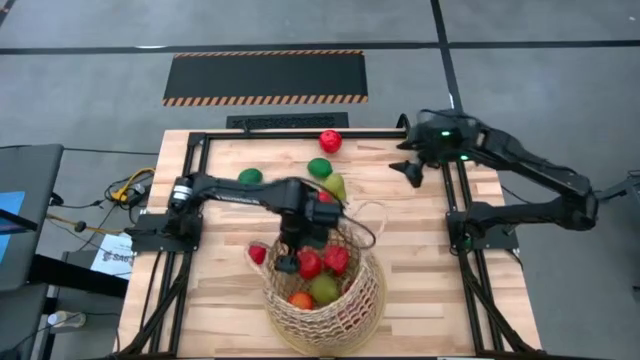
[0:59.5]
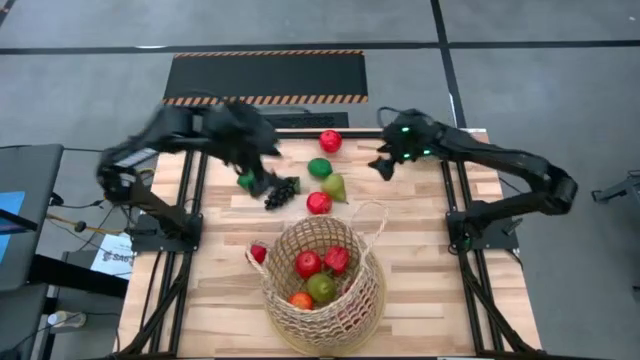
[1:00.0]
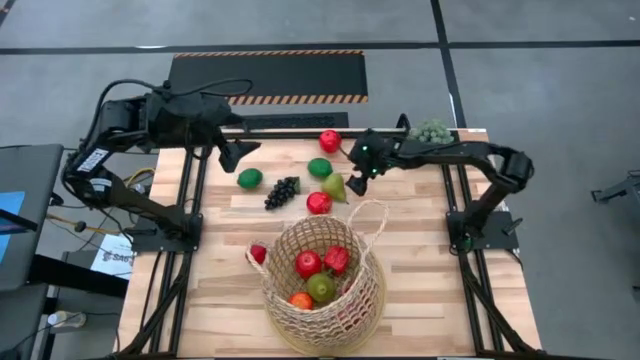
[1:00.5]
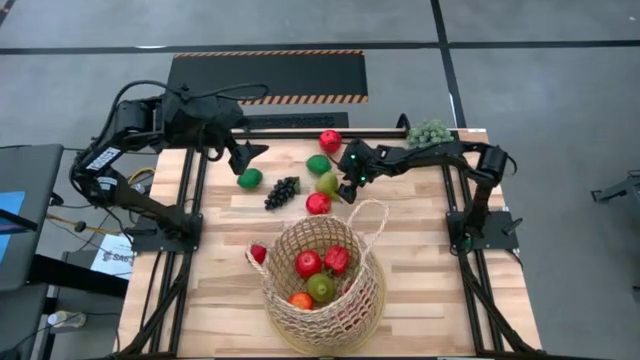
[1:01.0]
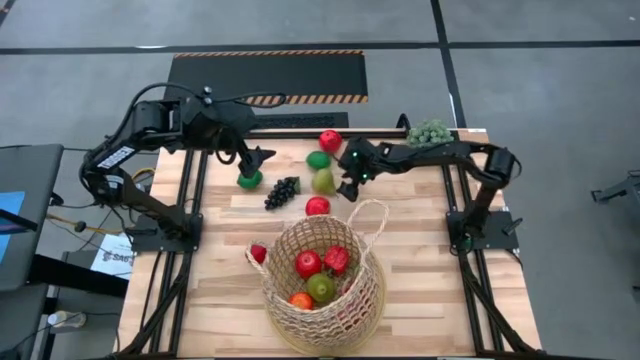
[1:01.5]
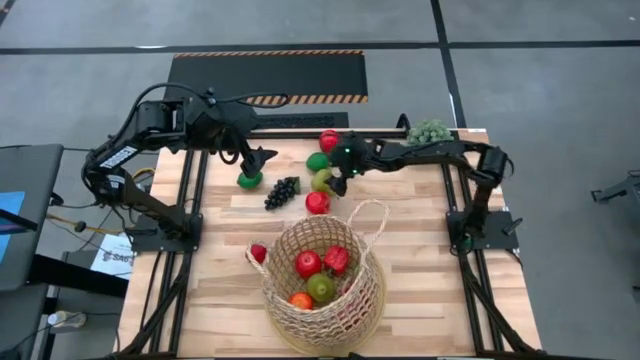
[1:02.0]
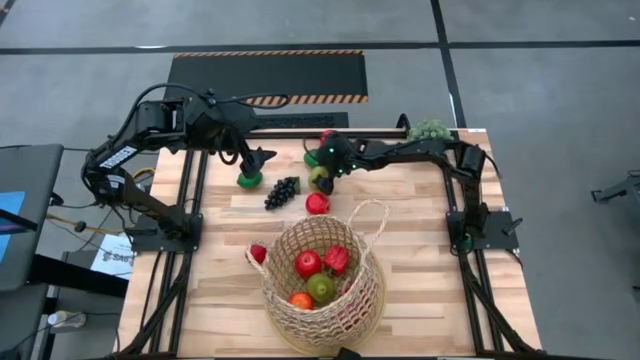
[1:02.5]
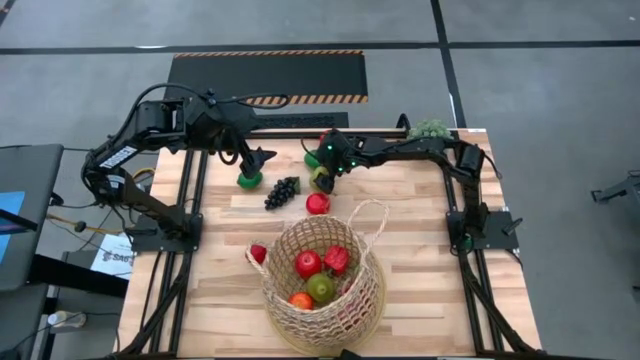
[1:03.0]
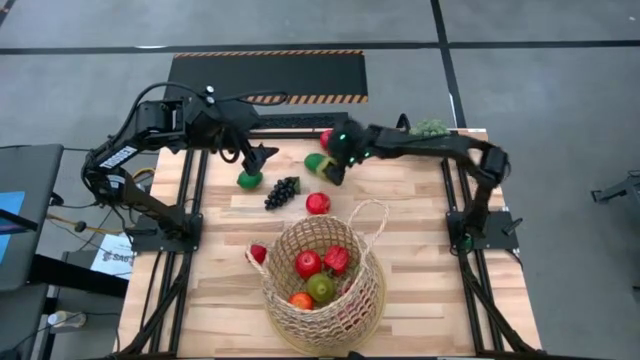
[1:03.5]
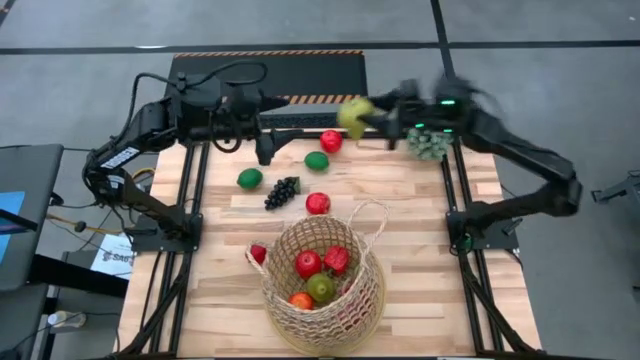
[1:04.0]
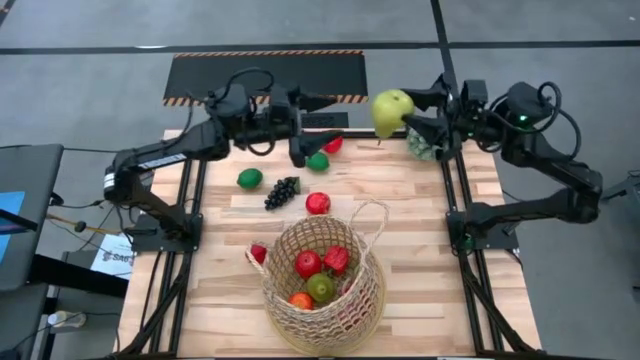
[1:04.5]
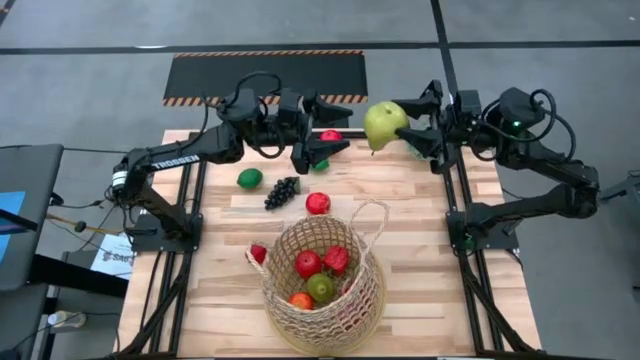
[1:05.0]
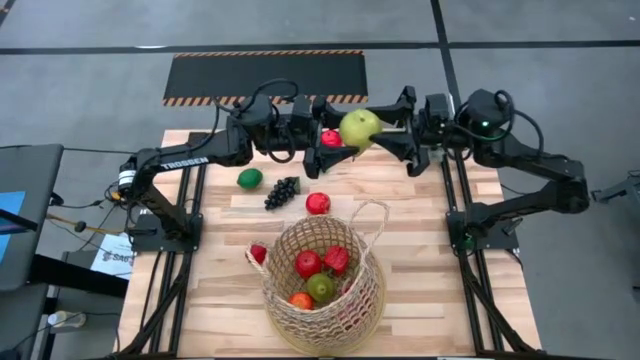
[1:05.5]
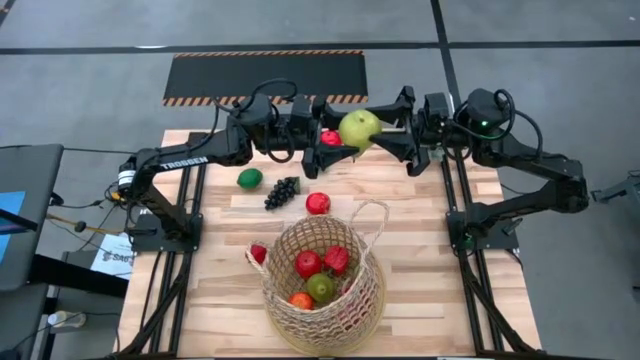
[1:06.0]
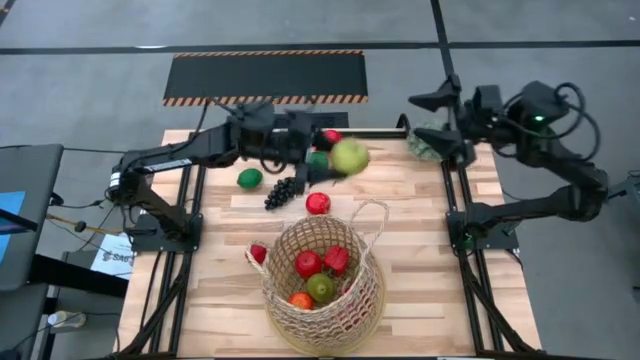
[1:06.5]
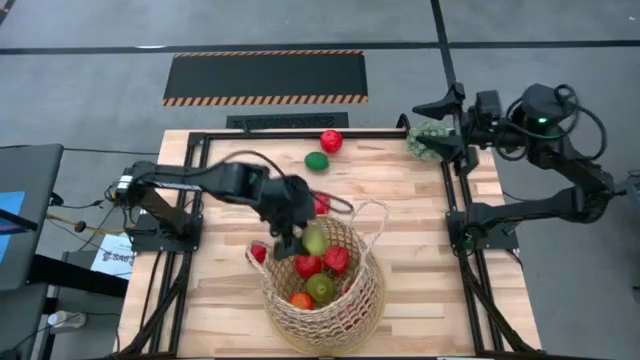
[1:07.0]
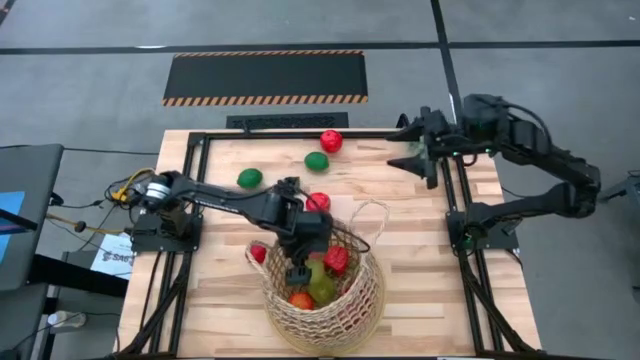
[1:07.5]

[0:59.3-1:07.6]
Task: Build produce basket
Put the pear into the basket

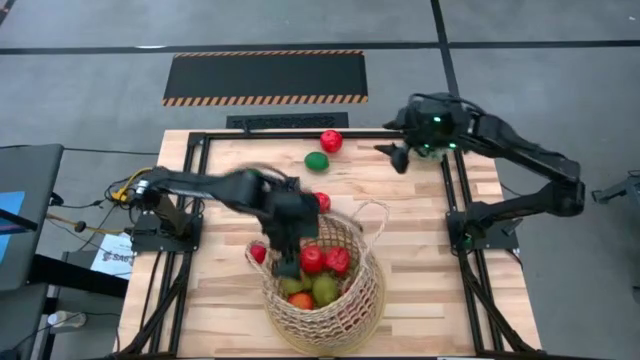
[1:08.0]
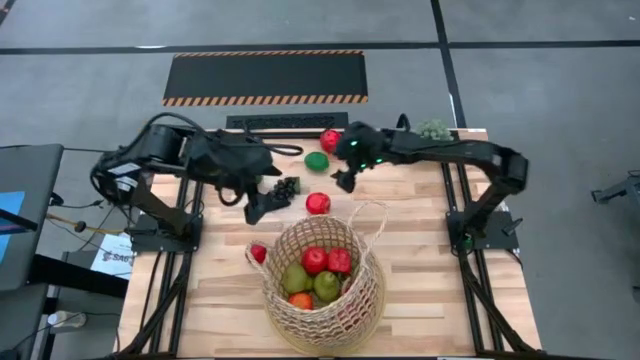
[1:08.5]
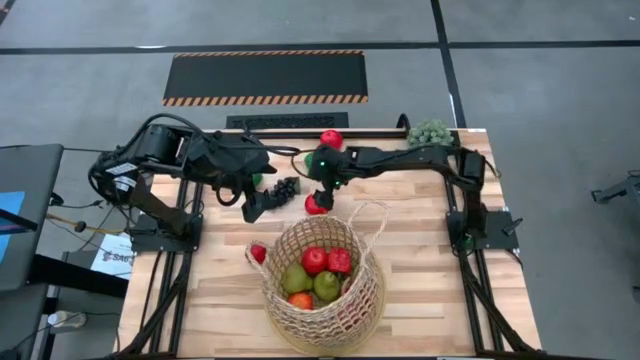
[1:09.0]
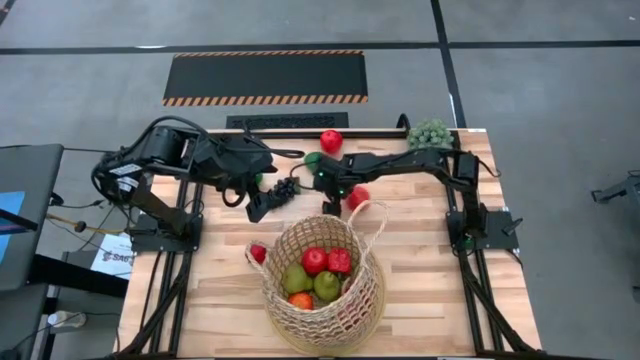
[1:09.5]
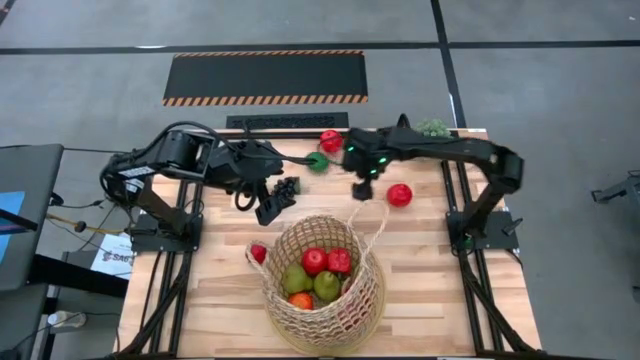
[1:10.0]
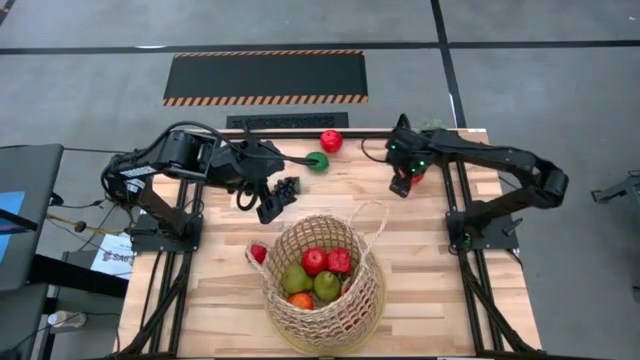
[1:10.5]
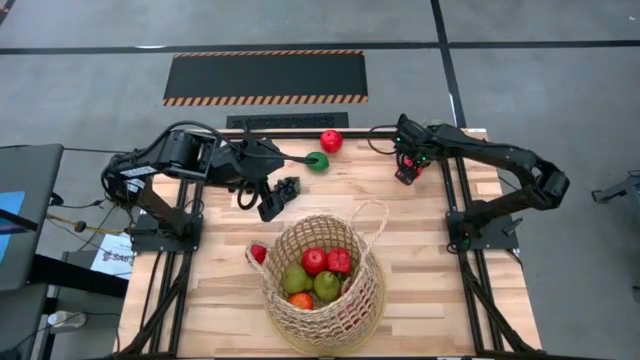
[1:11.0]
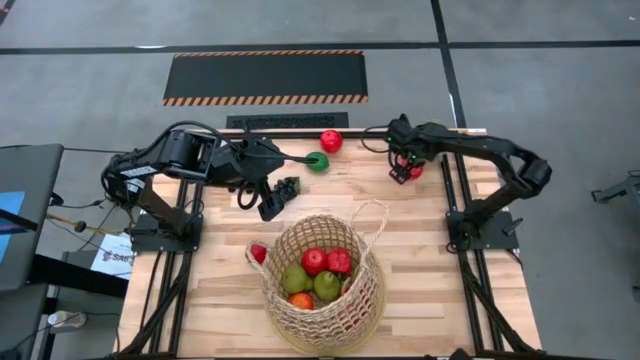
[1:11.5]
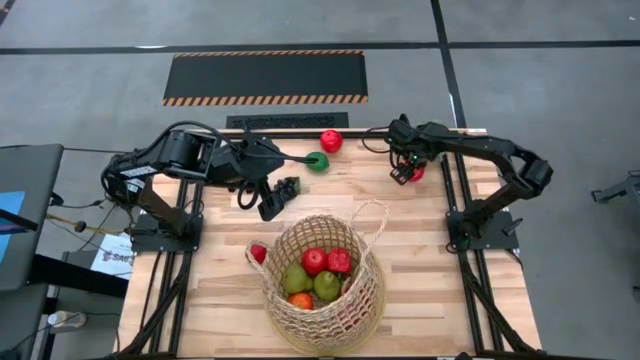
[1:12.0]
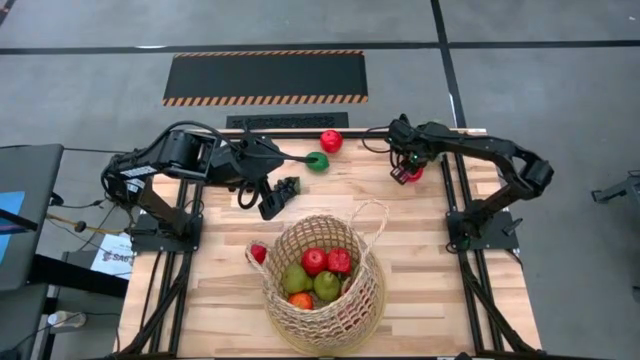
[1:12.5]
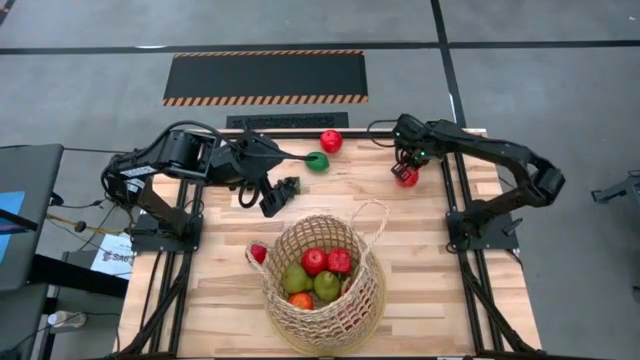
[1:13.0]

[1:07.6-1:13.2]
Put the apple into the basket

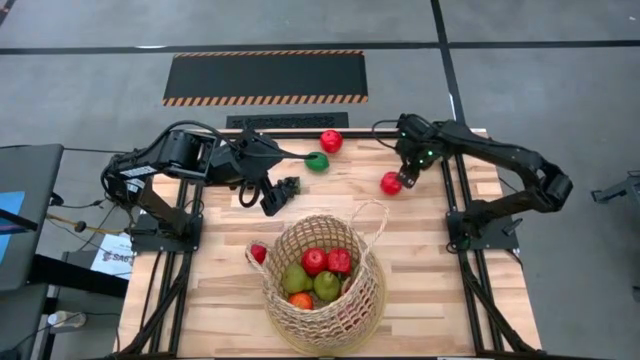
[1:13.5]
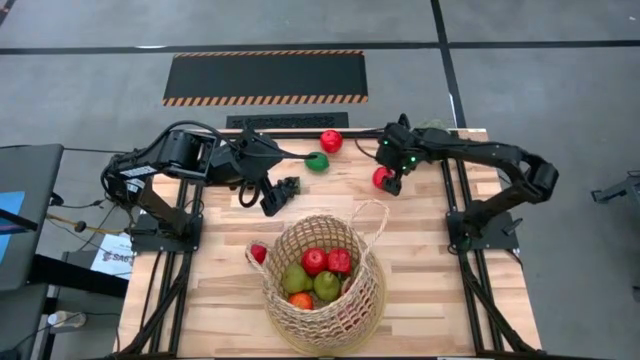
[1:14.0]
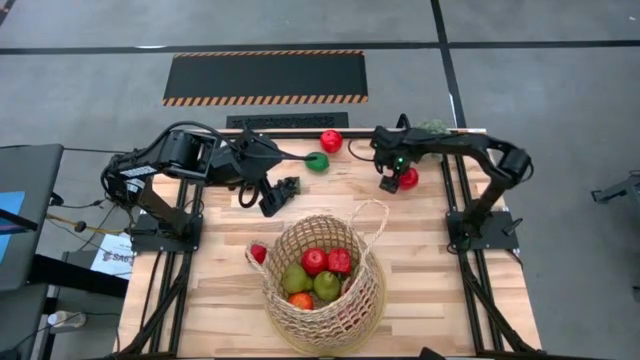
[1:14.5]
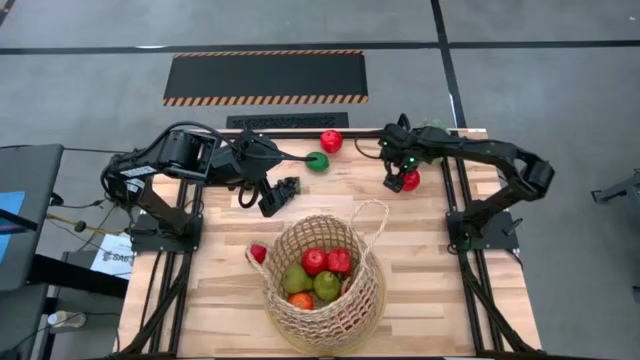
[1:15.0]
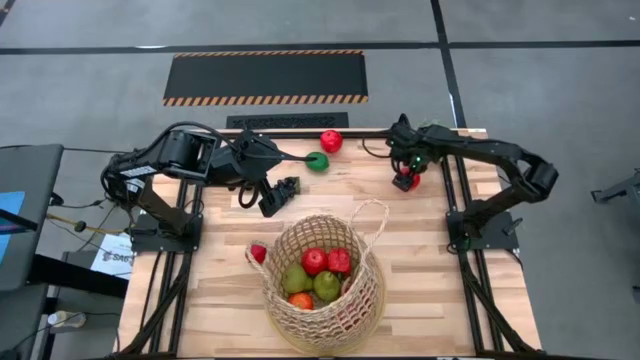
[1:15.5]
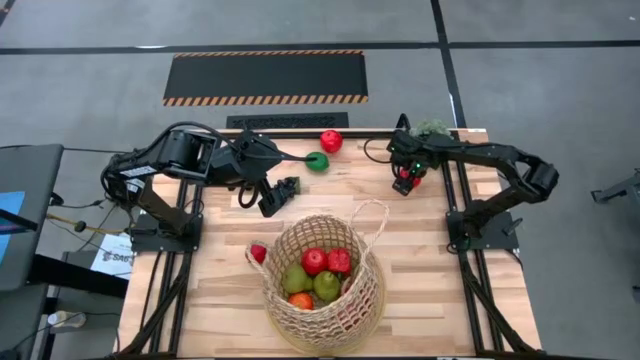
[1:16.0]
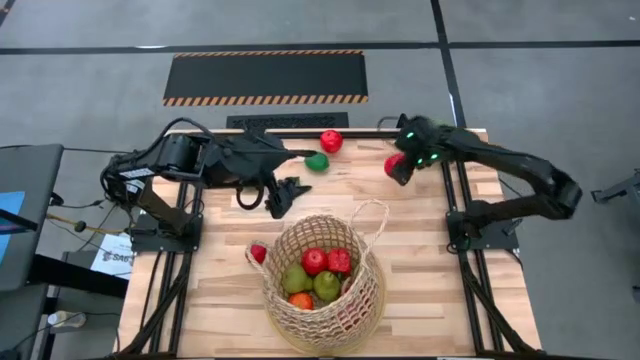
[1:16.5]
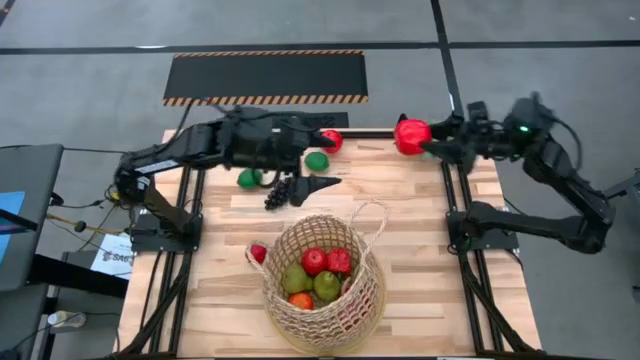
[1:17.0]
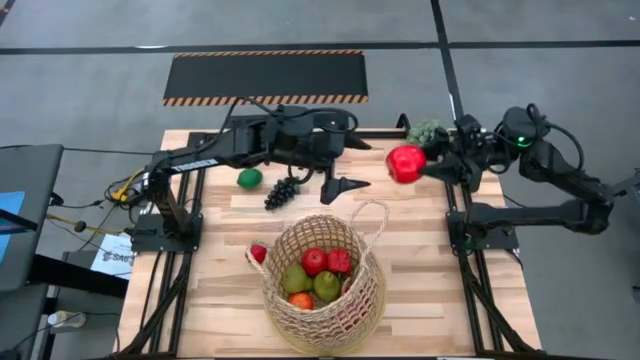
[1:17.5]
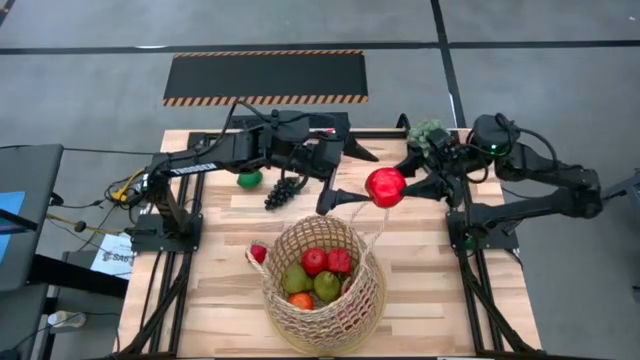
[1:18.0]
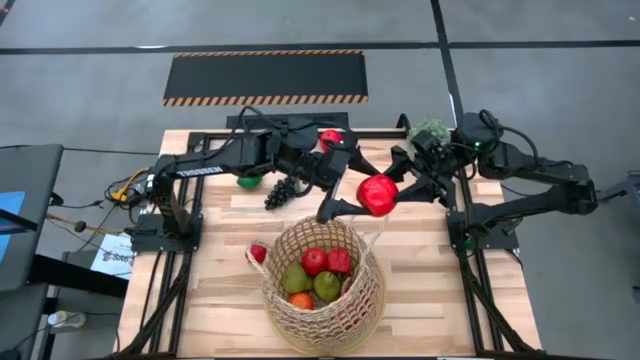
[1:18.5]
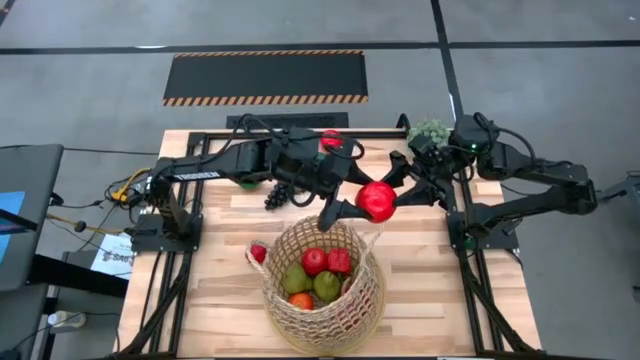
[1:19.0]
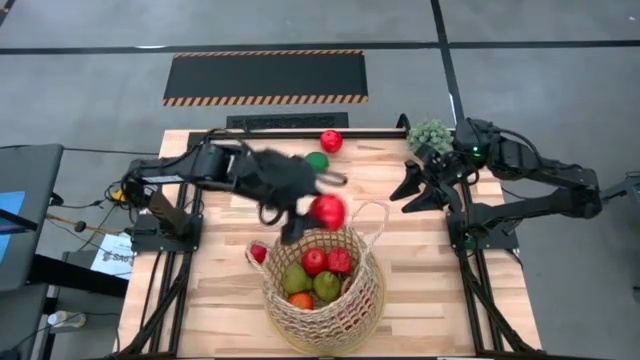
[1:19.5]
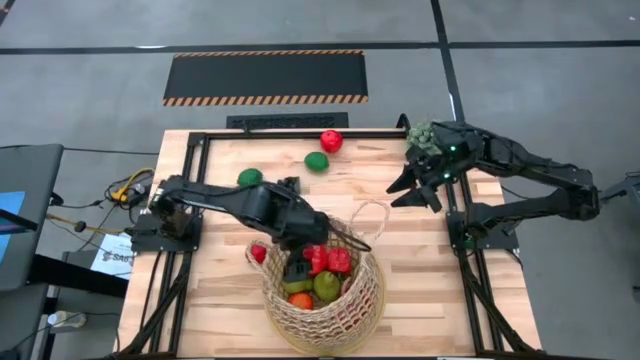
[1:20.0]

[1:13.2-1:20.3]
Put the apple into the basket

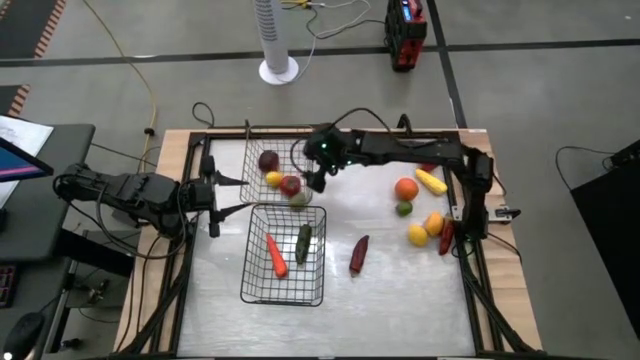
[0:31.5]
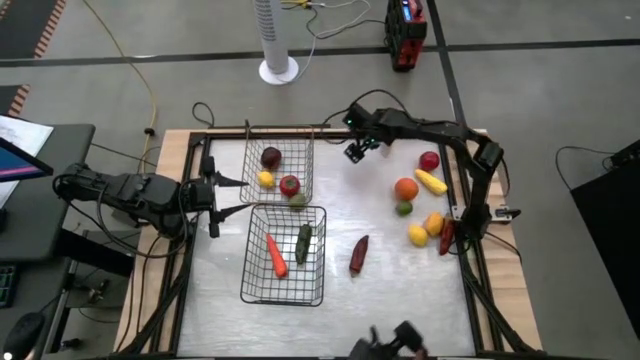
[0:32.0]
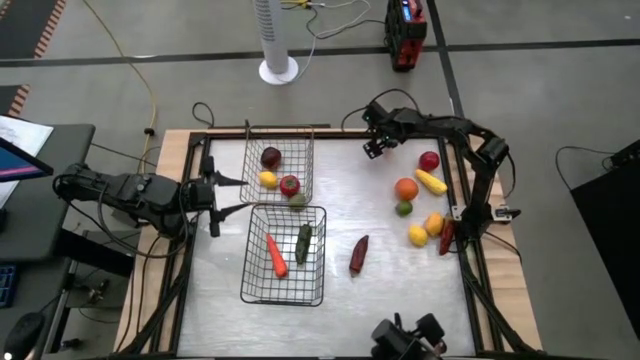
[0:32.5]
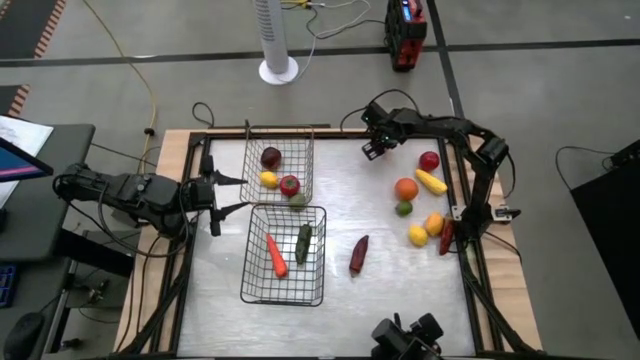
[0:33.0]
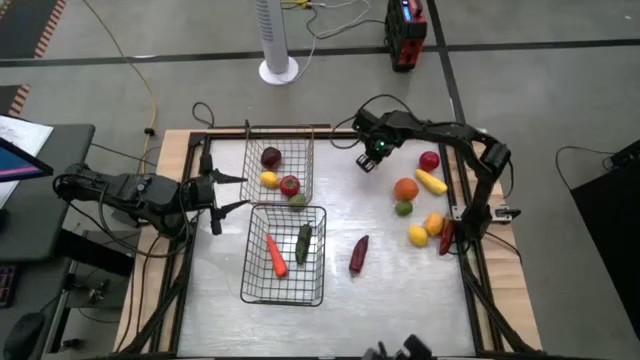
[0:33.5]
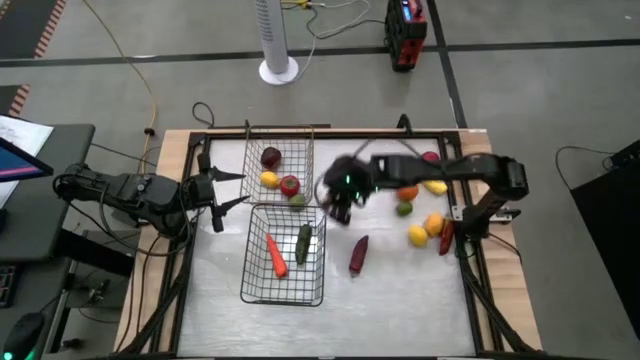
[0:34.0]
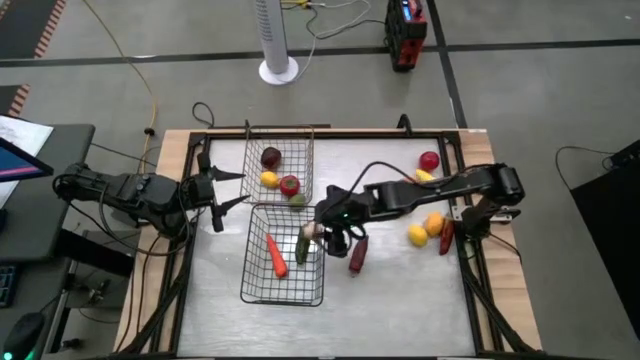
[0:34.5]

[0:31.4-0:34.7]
Task: Sort produce into baskets
Put the garlic into the black wire basket
